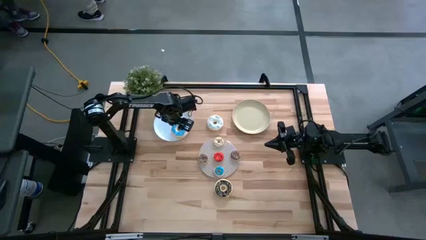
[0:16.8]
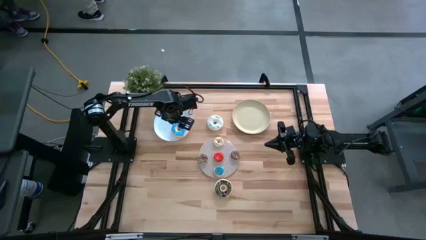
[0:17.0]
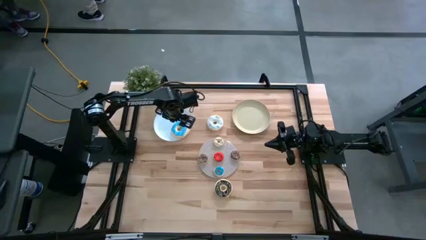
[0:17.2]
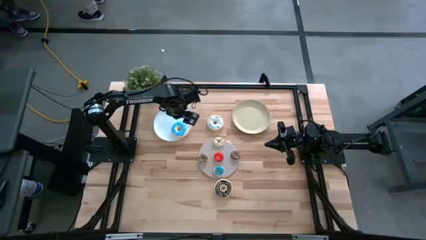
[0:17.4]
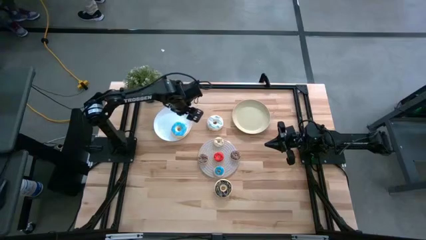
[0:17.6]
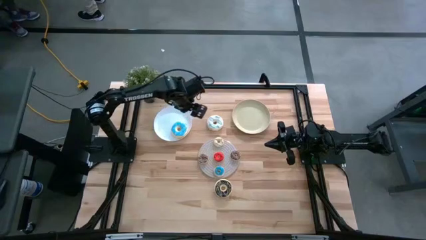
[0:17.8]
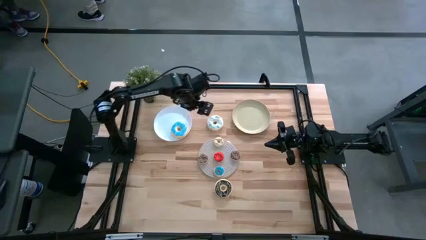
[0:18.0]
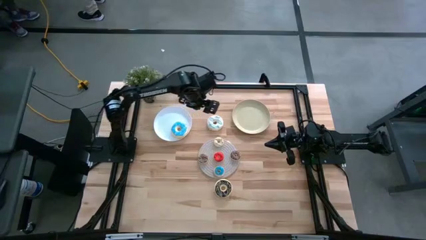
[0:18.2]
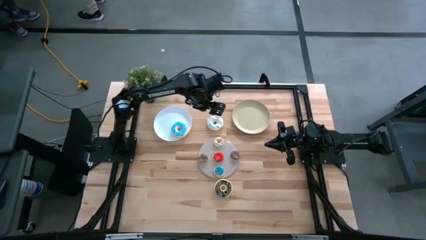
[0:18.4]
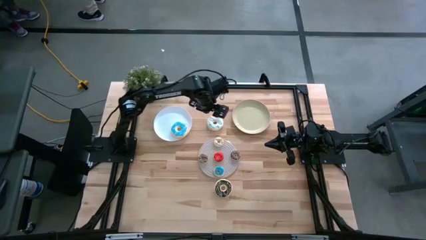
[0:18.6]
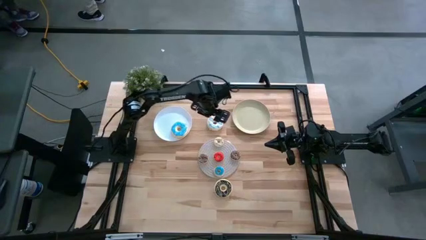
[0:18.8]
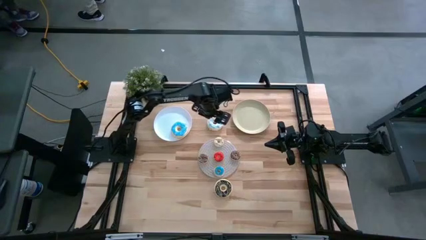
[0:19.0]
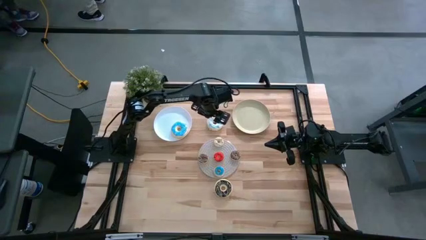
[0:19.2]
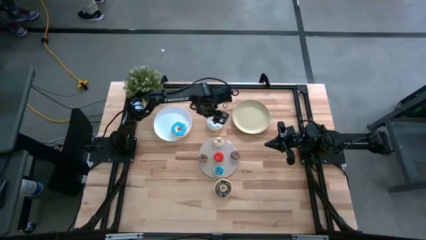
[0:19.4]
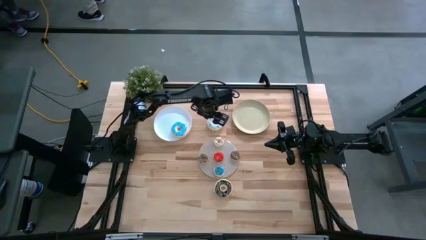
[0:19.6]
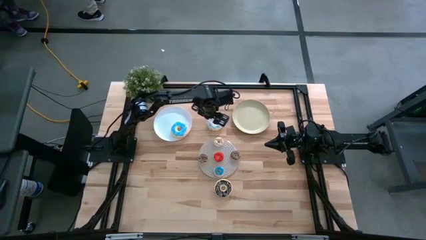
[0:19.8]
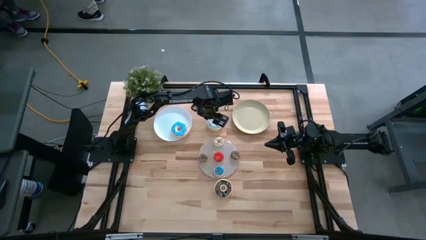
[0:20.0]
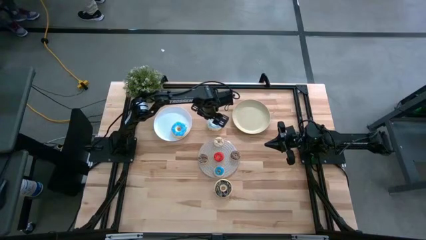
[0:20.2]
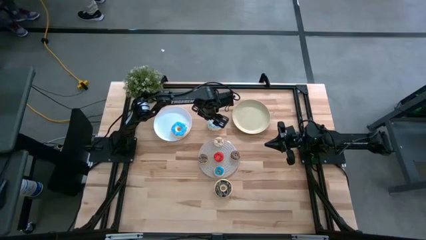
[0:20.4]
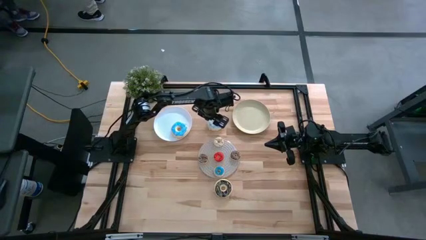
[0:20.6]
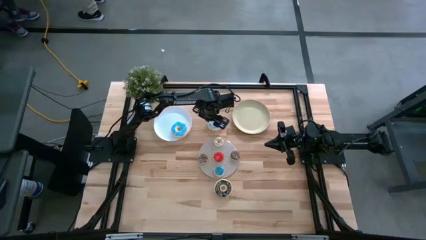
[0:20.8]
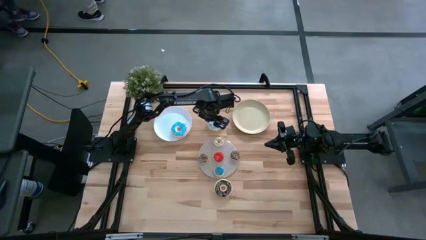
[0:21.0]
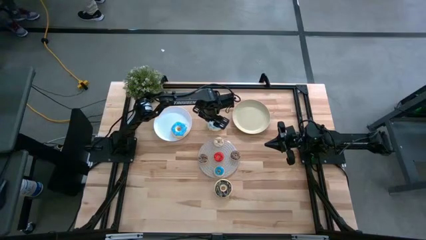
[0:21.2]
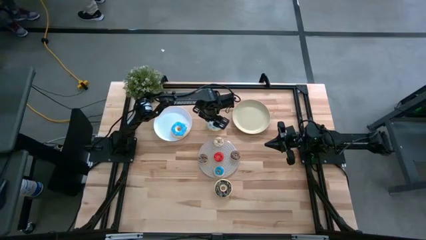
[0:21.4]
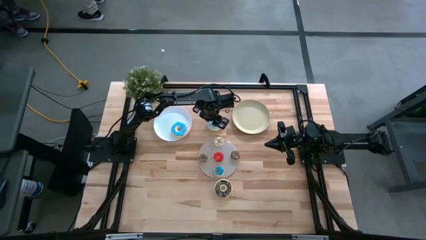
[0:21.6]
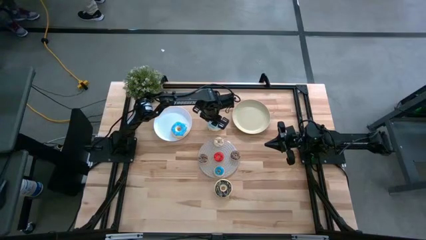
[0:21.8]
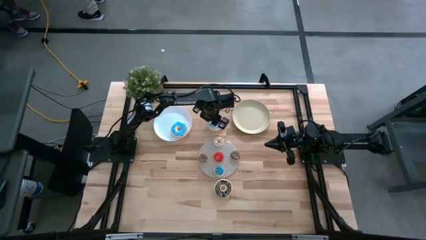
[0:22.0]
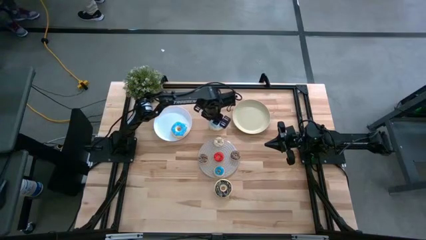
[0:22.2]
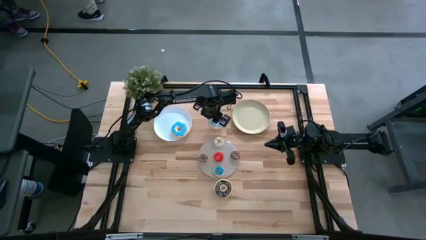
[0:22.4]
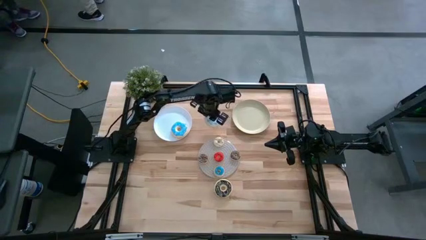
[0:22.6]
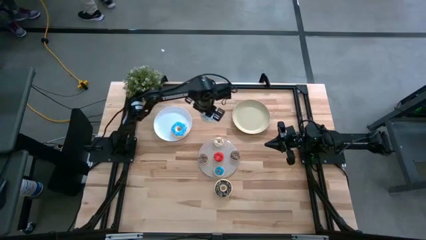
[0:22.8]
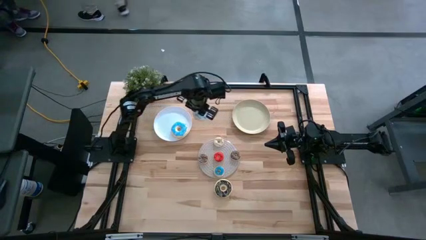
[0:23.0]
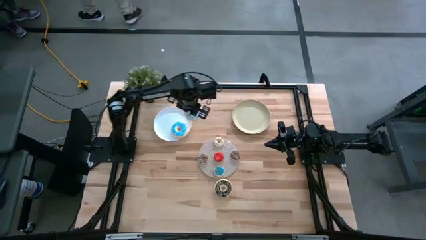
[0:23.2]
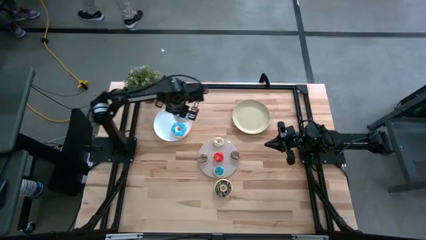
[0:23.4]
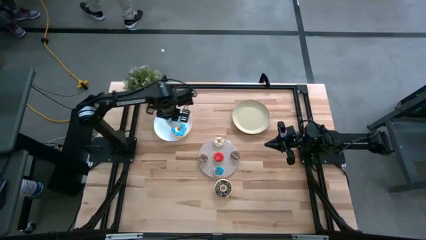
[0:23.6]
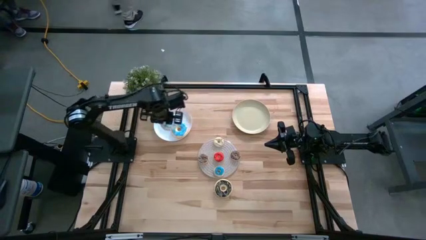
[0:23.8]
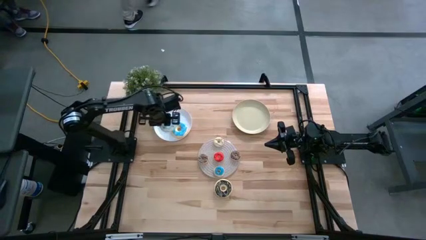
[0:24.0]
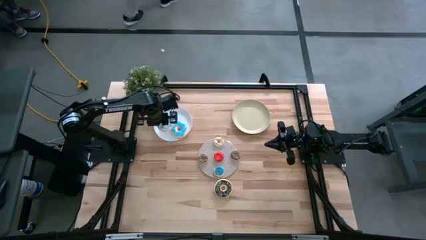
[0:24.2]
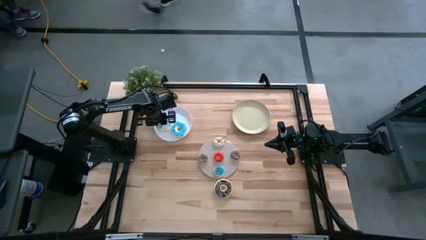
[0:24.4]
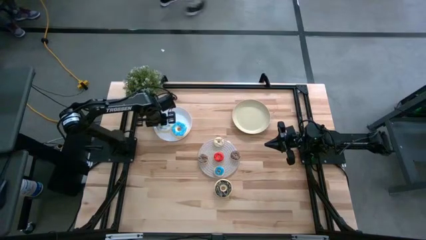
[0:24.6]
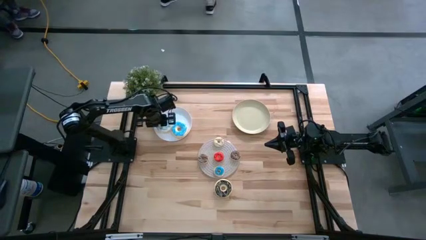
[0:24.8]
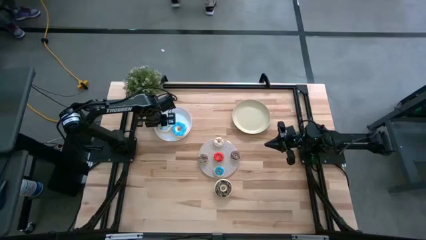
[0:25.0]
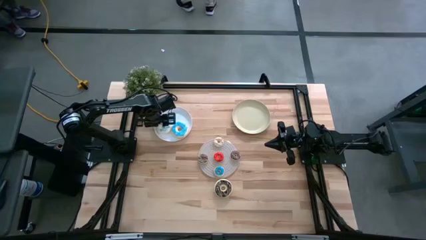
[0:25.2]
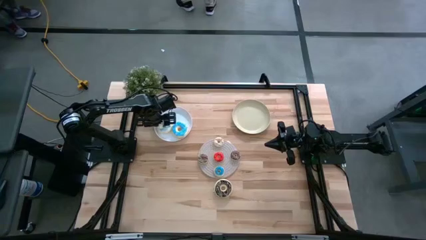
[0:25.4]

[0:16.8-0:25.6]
Task: Pick & Place donuts
Put the big white donut on the white plate

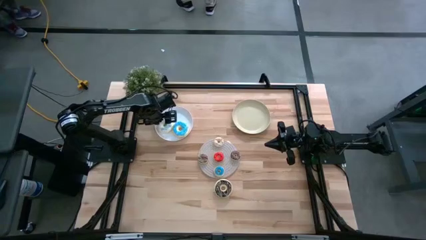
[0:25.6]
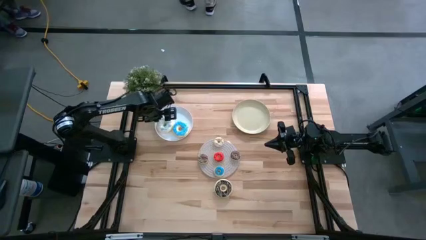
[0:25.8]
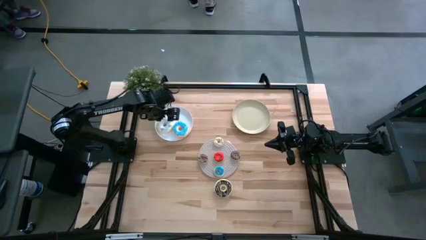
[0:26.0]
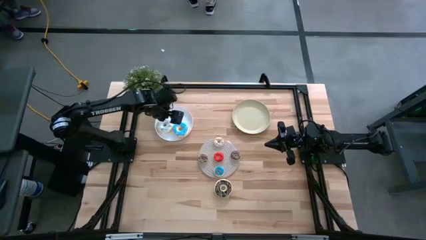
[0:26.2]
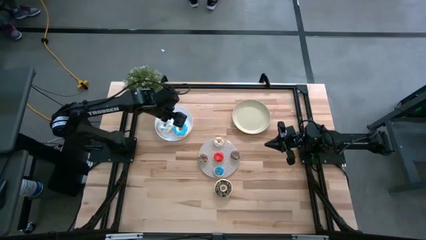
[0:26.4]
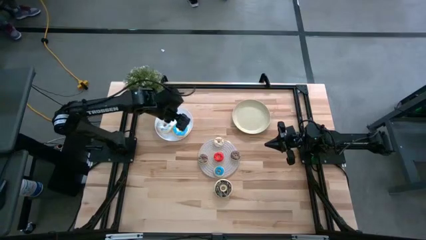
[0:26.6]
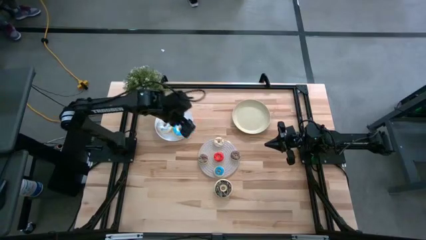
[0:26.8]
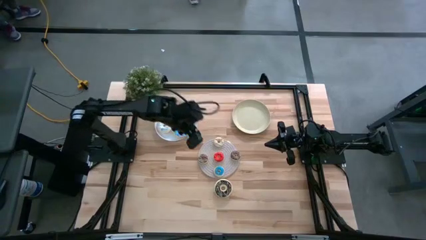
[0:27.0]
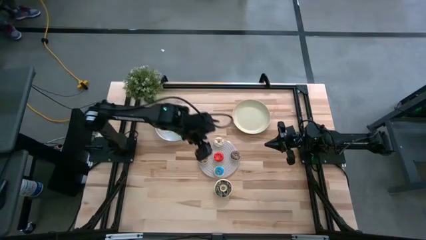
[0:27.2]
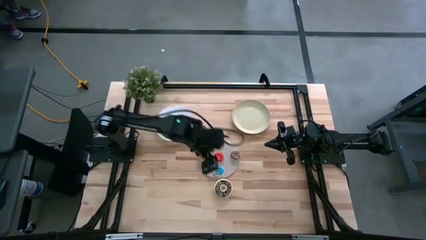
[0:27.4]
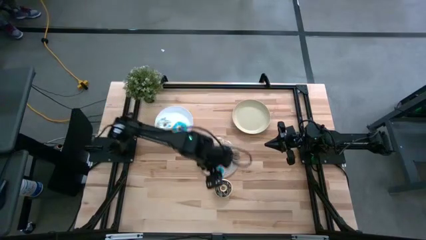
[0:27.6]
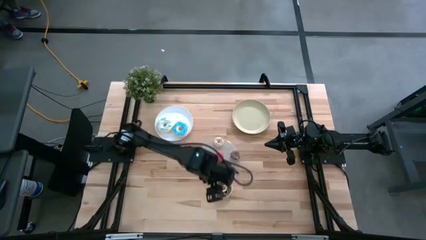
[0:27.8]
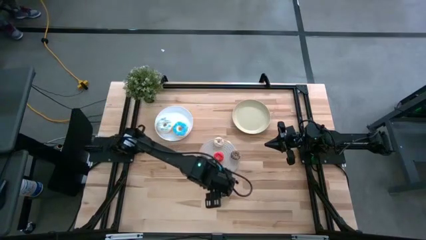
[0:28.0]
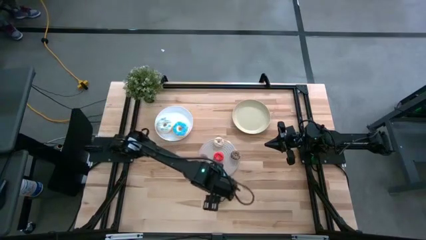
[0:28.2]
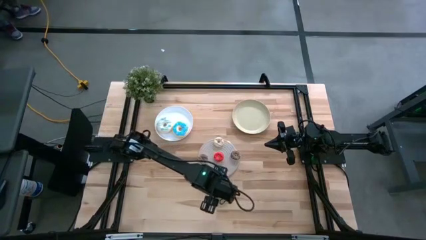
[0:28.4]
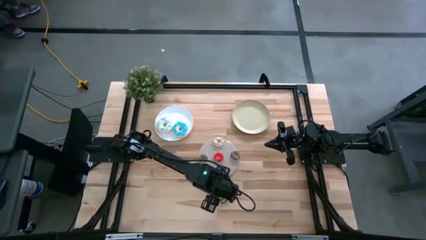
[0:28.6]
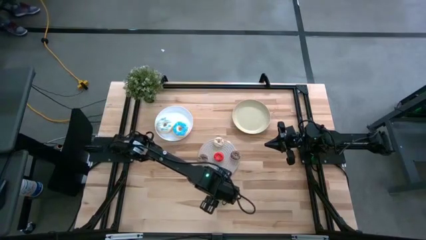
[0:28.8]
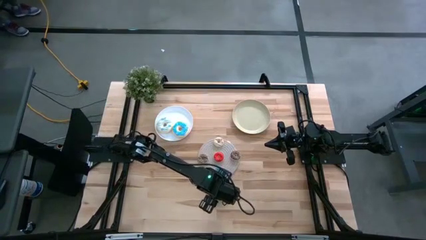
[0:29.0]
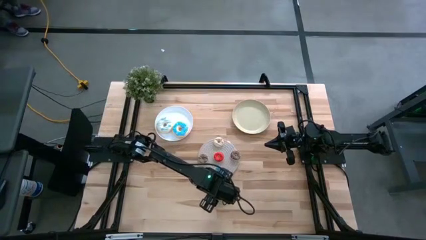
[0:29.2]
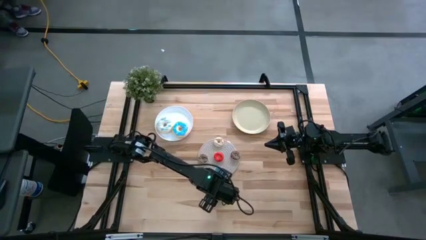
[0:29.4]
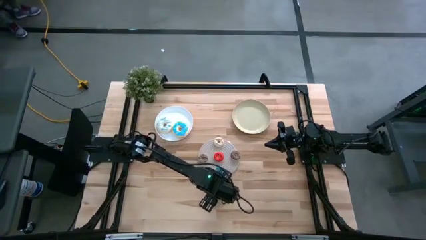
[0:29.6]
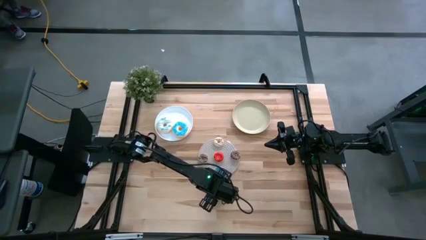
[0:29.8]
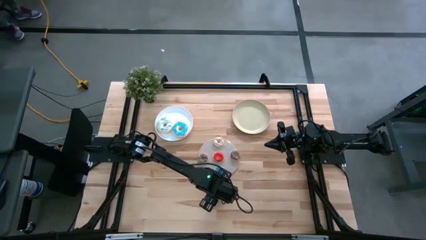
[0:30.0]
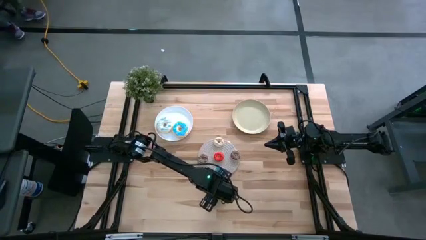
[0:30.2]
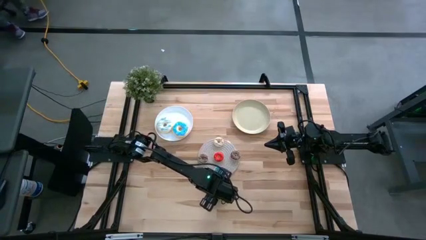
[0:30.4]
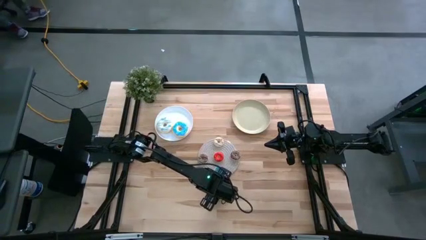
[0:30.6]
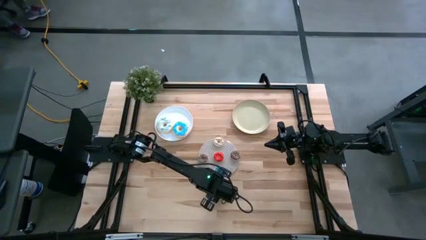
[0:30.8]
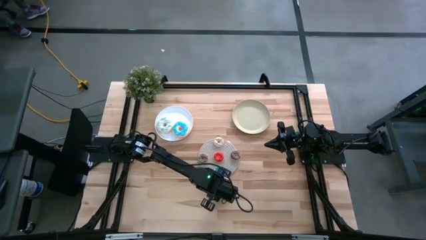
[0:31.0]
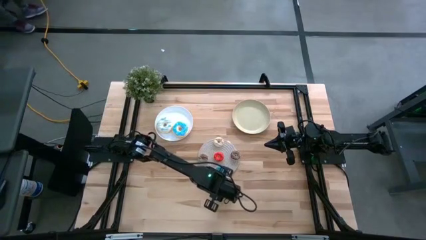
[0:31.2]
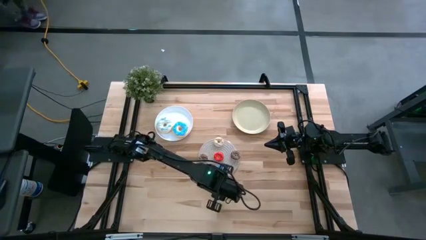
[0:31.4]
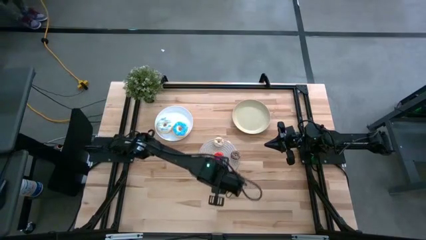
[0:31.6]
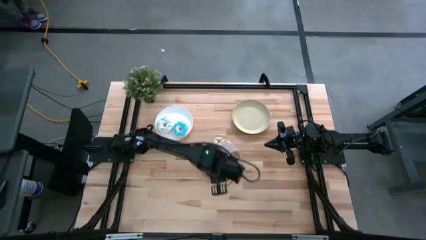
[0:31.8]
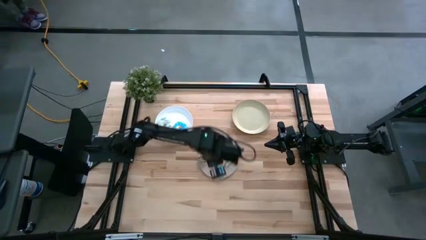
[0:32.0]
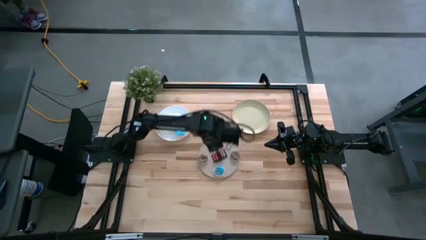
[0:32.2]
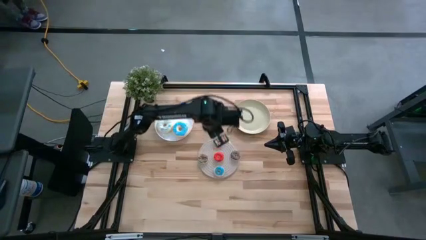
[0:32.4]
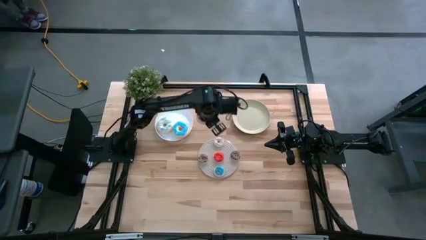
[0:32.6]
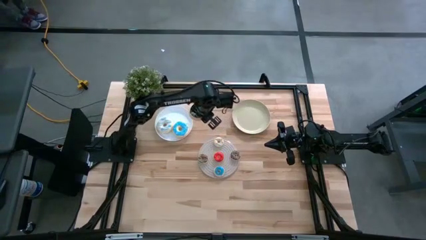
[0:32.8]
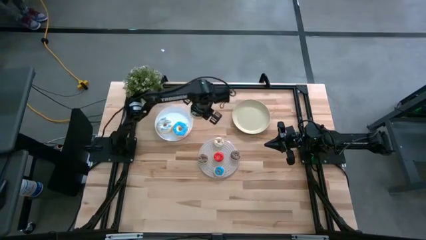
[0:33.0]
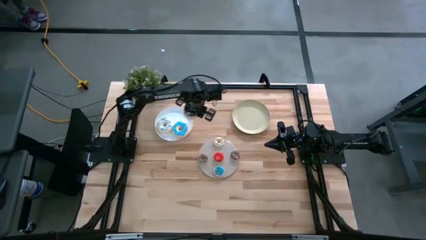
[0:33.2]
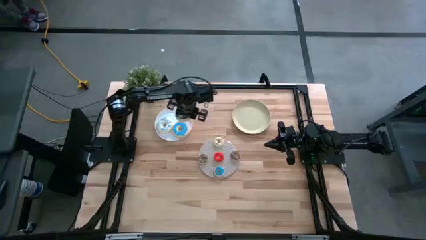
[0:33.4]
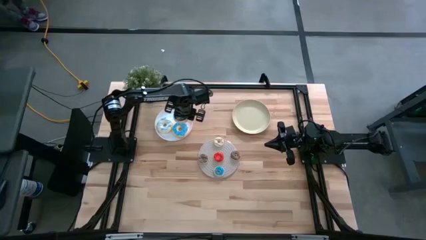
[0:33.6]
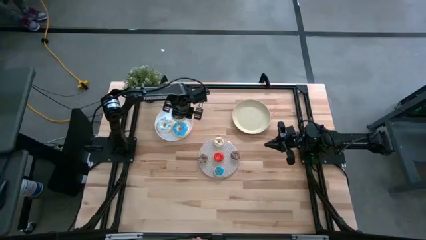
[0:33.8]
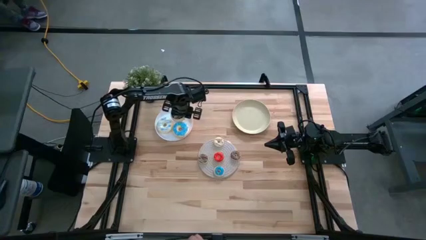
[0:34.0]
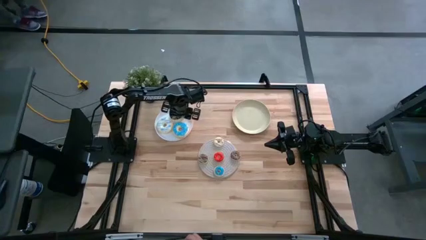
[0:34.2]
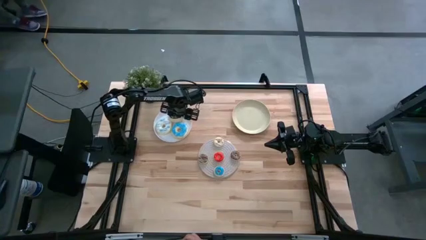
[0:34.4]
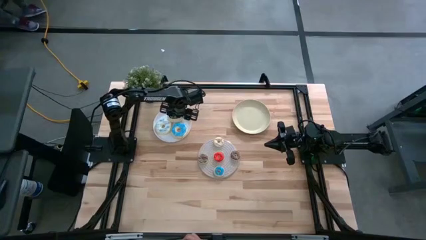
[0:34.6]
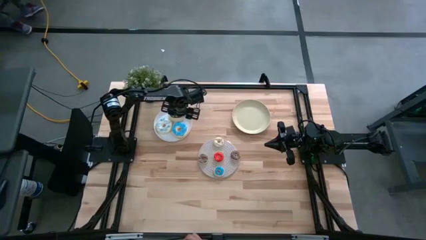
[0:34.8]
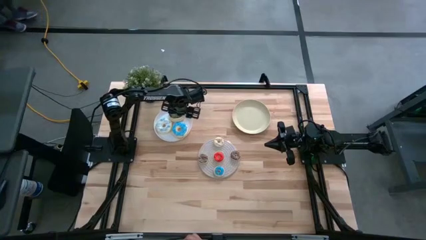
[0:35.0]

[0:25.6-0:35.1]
Put the big black donut on the white plate
